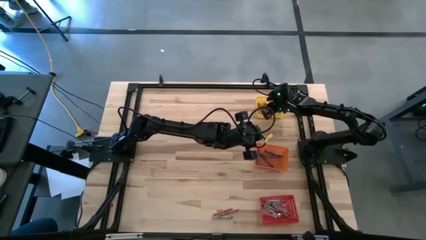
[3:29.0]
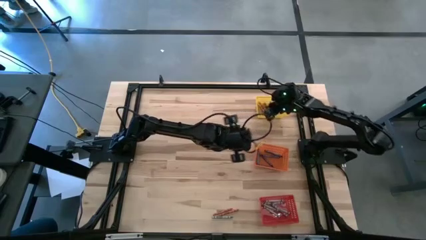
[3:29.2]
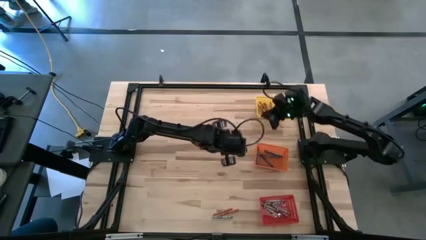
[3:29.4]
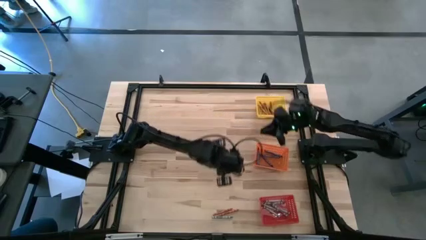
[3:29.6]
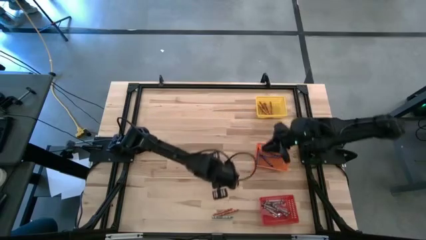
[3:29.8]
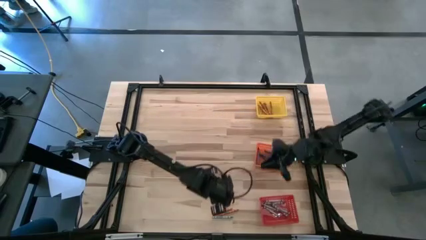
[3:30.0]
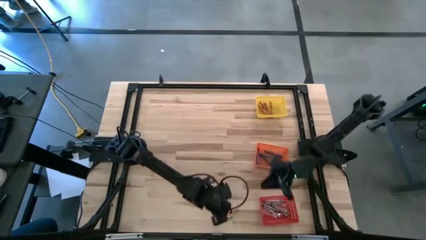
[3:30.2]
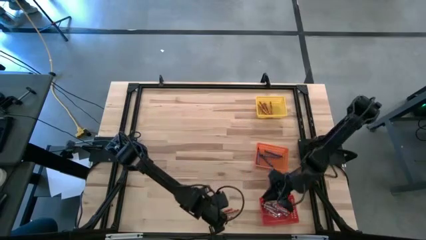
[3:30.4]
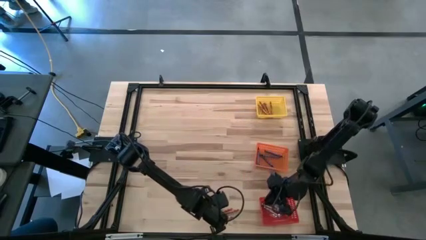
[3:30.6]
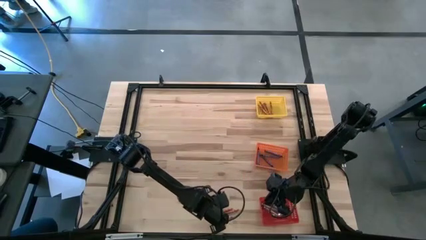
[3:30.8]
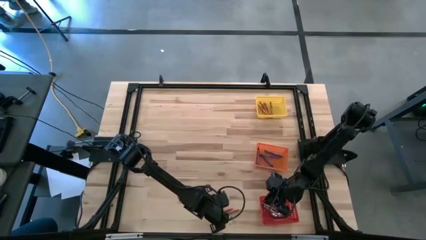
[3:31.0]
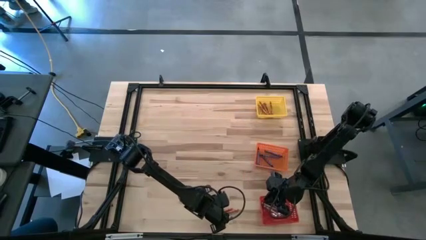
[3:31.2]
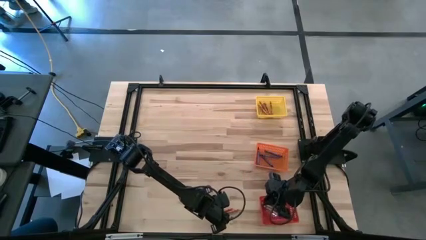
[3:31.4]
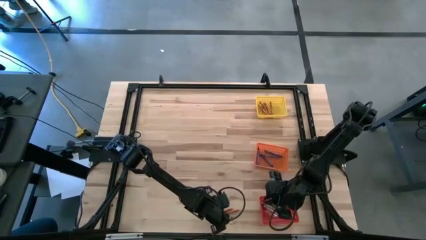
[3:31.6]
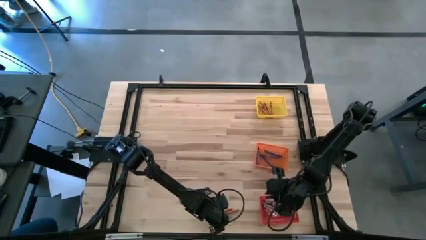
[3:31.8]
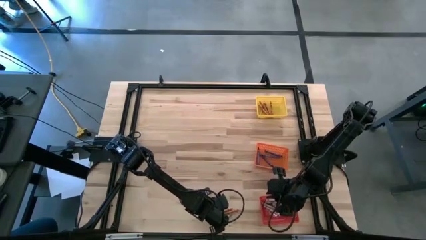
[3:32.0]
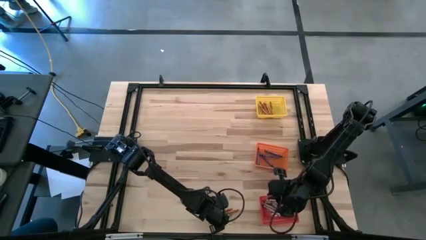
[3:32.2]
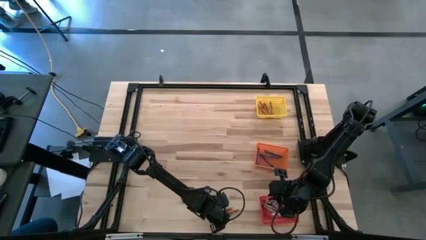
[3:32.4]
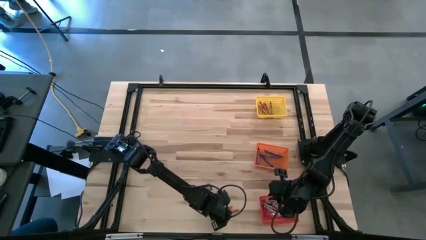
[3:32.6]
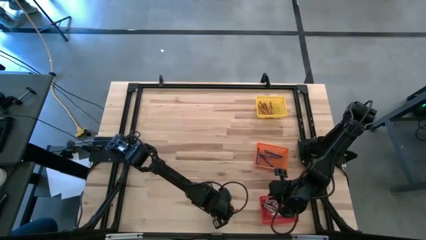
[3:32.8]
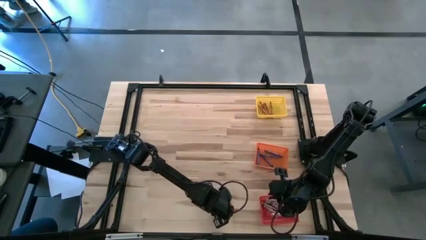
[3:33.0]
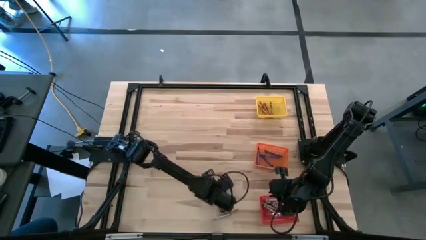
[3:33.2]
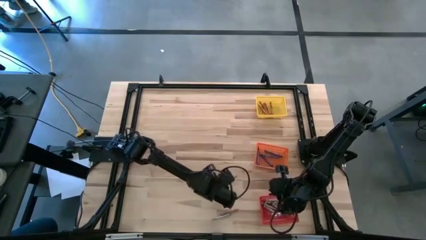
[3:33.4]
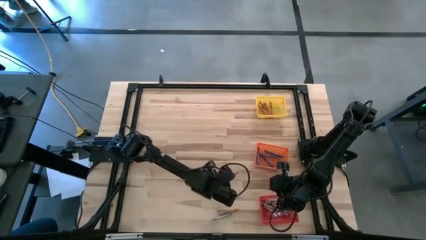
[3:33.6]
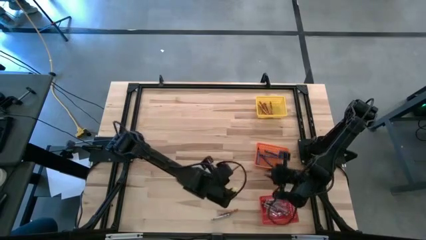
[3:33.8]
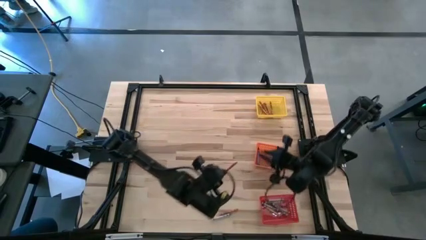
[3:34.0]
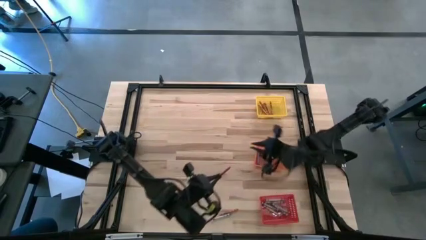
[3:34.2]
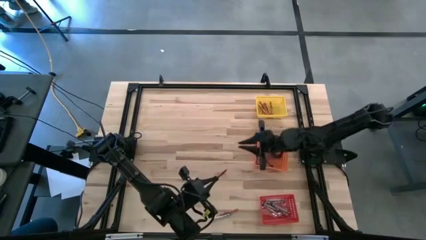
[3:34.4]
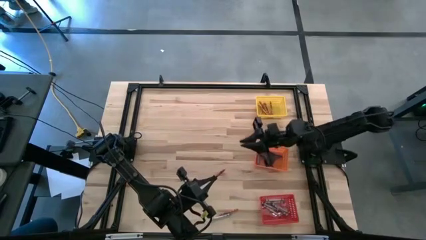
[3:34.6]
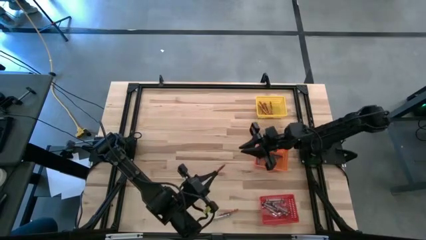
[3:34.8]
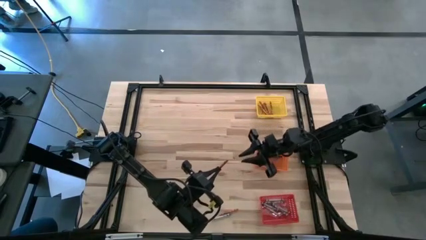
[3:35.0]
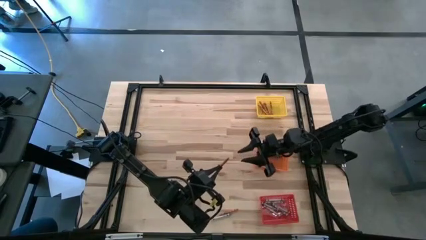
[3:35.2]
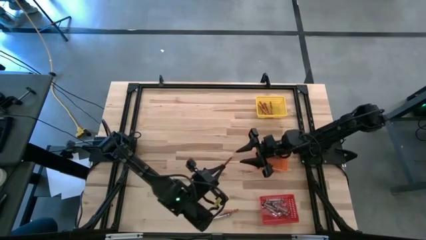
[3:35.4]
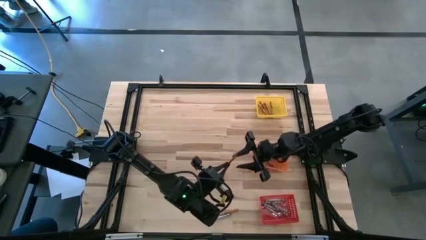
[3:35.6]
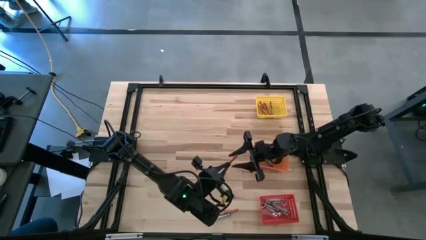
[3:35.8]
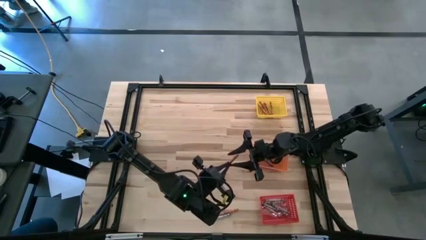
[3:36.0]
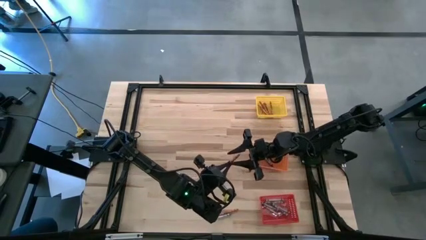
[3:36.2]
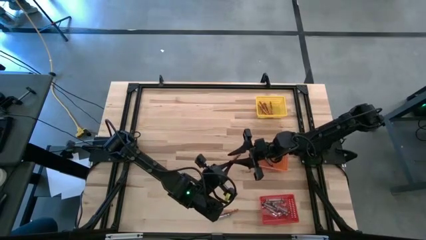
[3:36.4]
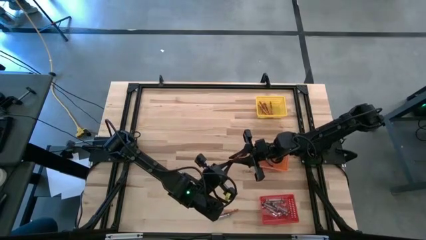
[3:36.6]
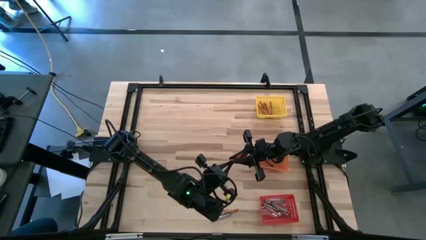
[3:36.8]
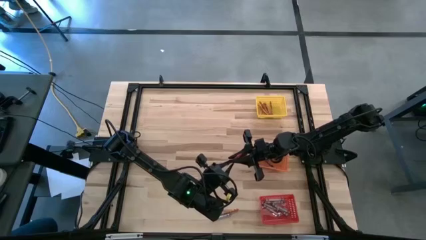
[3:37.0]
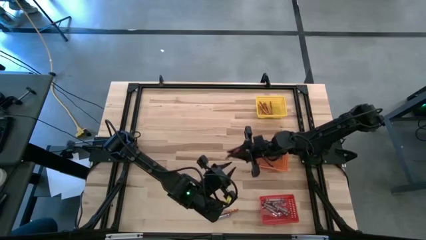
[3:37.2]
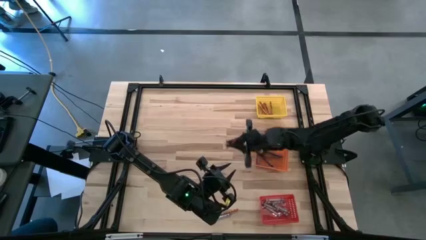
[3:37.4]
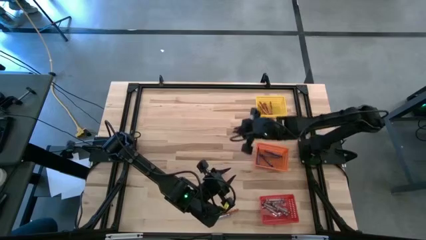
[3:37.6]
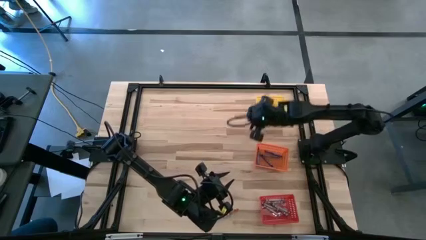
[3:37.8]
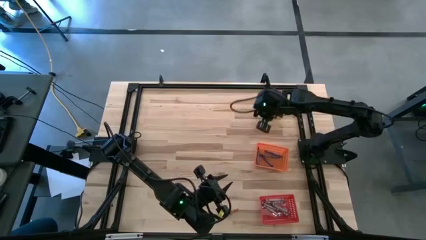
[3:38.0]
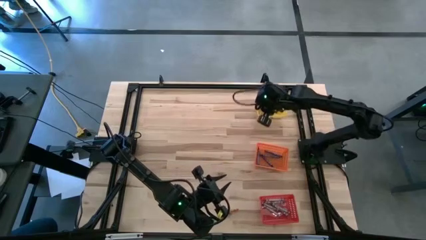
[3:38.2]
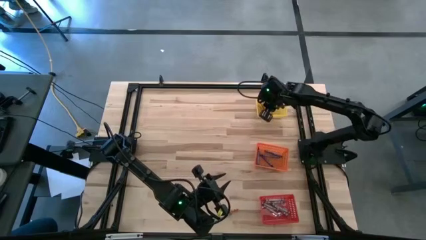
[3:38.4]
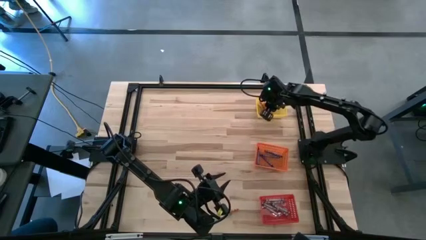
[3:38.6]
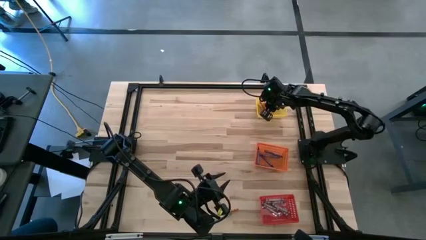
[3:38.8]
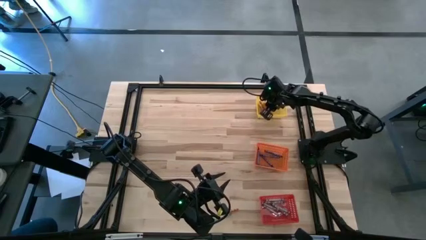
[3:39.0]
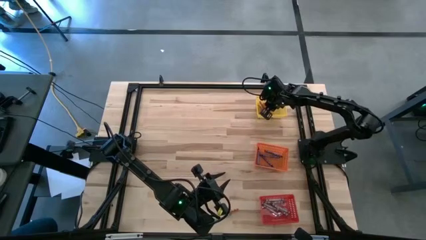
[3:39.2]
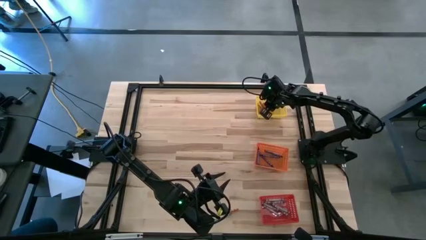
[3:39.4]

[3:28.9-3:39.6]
Task: Sort crayons
Put the orange crayon into the yellow bin
